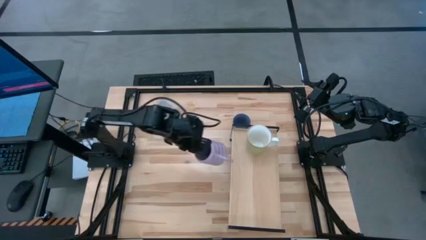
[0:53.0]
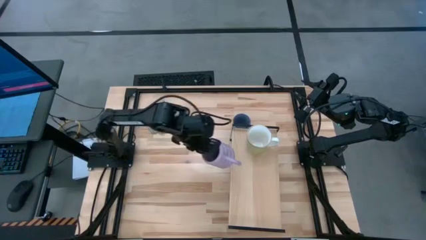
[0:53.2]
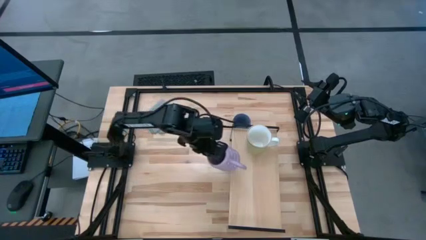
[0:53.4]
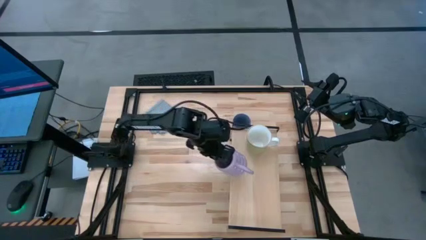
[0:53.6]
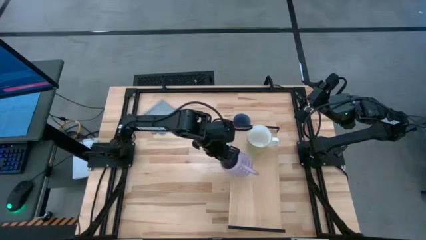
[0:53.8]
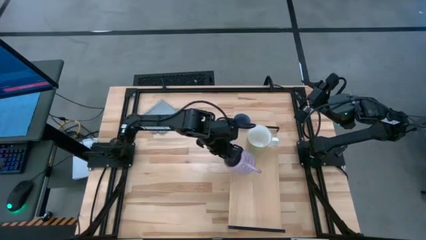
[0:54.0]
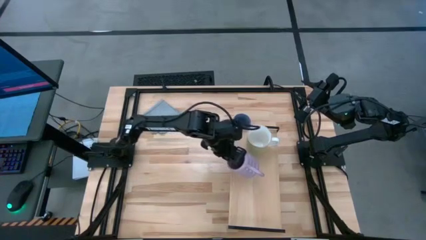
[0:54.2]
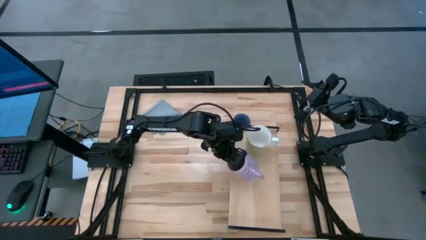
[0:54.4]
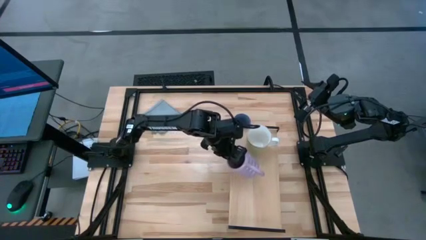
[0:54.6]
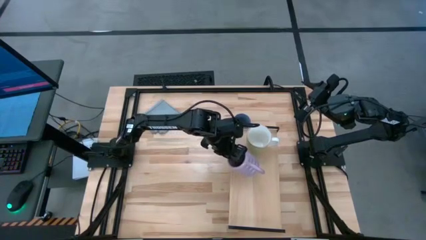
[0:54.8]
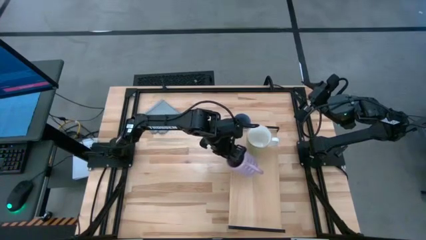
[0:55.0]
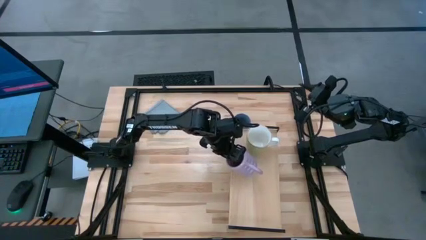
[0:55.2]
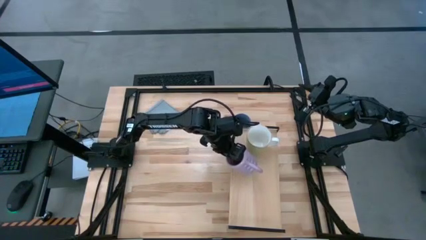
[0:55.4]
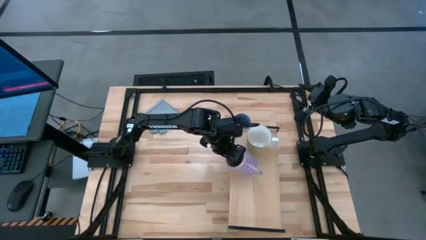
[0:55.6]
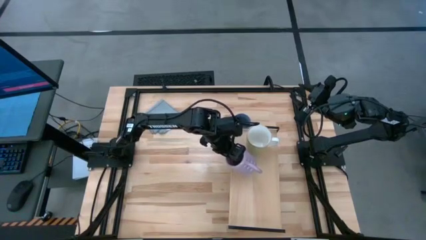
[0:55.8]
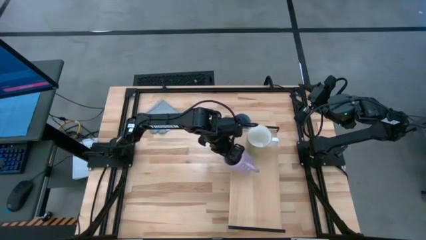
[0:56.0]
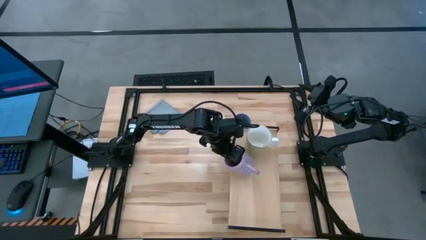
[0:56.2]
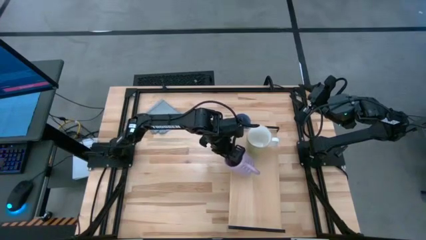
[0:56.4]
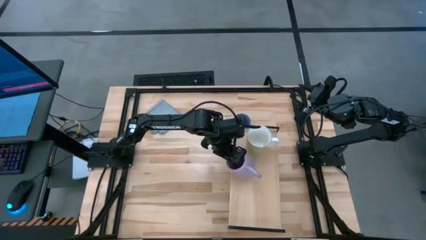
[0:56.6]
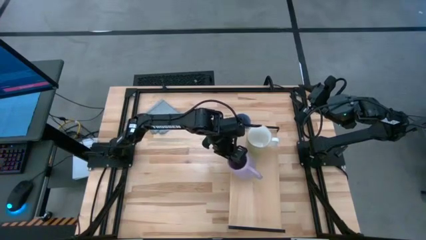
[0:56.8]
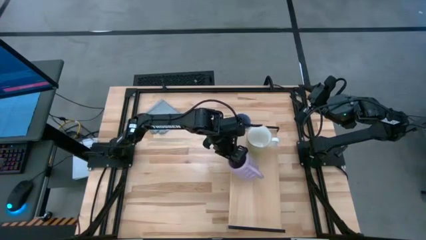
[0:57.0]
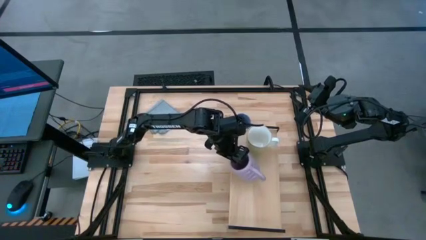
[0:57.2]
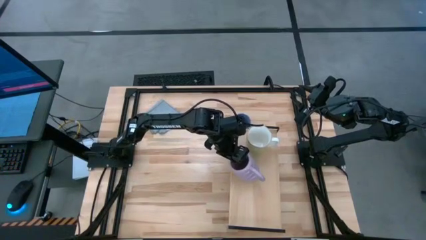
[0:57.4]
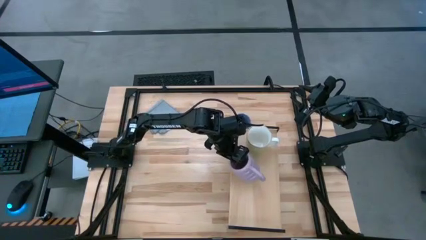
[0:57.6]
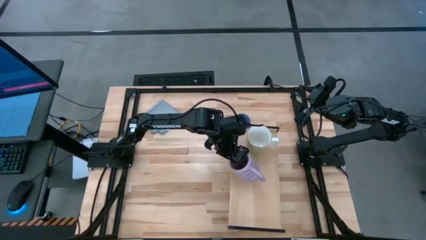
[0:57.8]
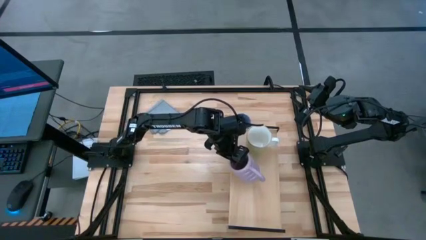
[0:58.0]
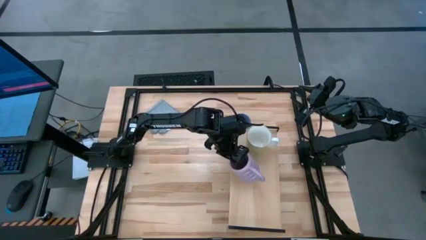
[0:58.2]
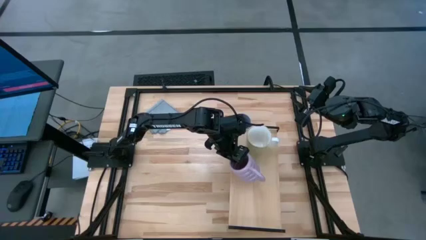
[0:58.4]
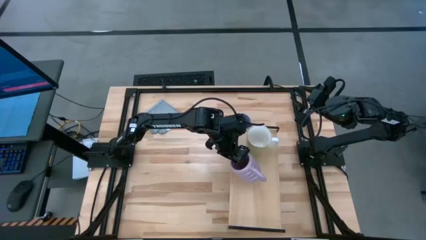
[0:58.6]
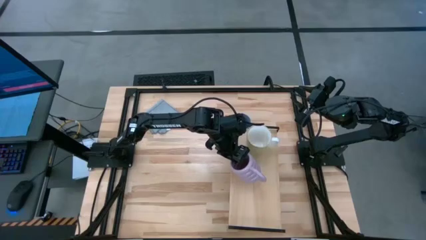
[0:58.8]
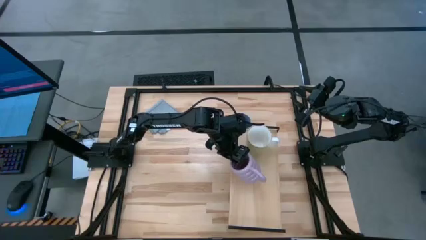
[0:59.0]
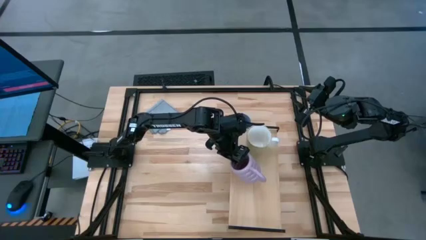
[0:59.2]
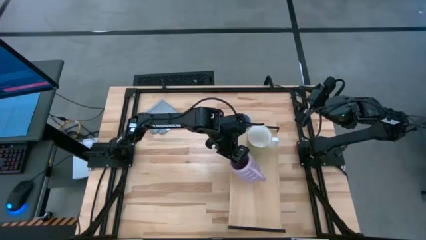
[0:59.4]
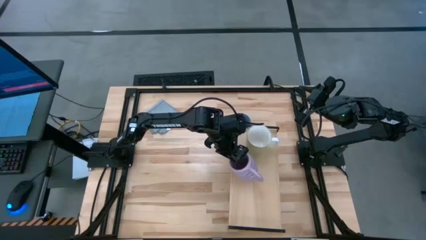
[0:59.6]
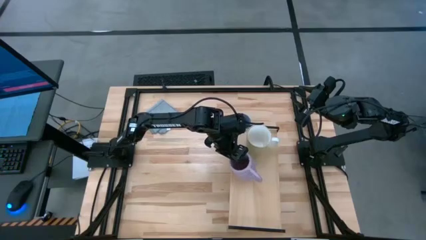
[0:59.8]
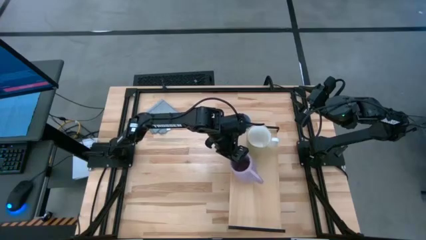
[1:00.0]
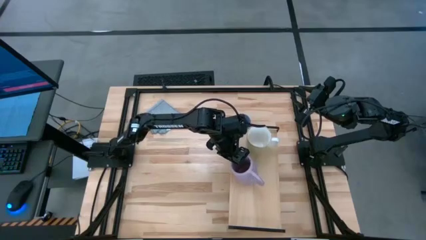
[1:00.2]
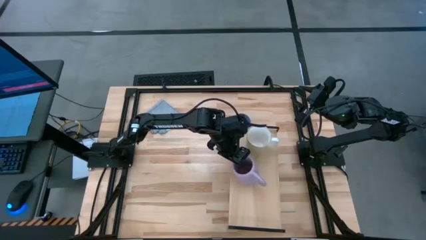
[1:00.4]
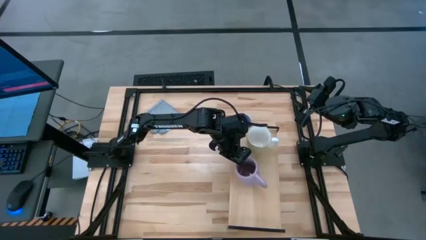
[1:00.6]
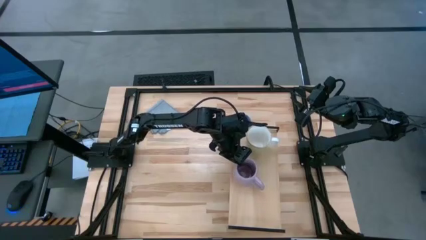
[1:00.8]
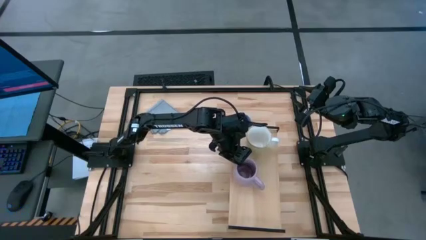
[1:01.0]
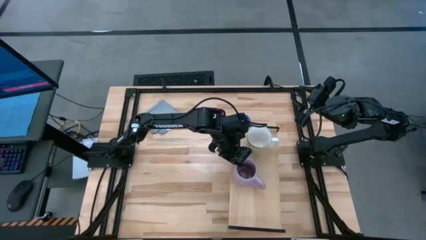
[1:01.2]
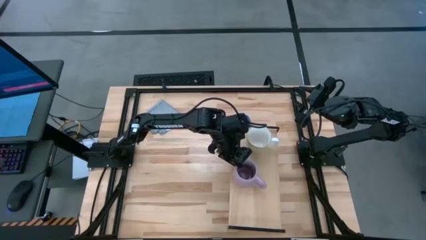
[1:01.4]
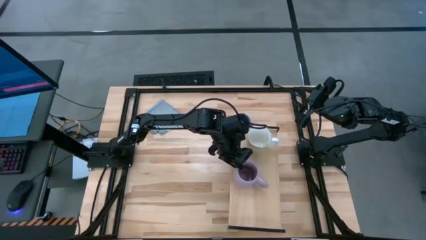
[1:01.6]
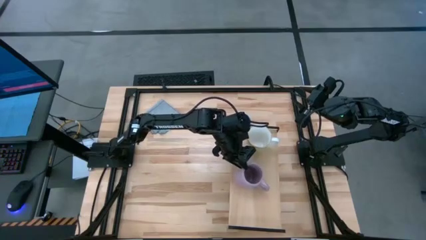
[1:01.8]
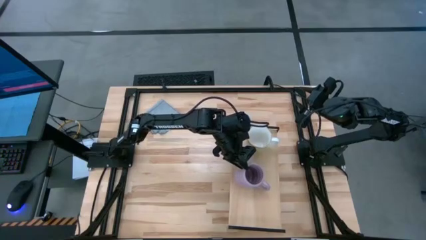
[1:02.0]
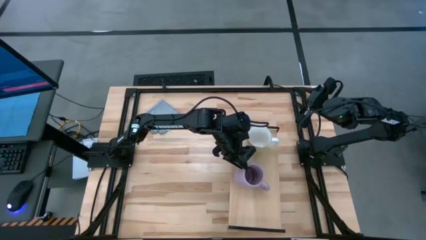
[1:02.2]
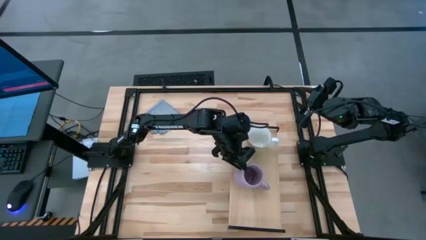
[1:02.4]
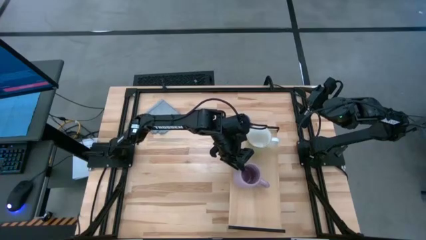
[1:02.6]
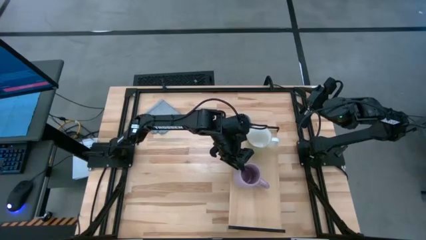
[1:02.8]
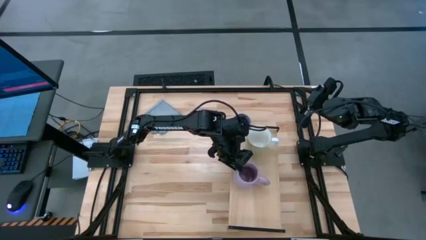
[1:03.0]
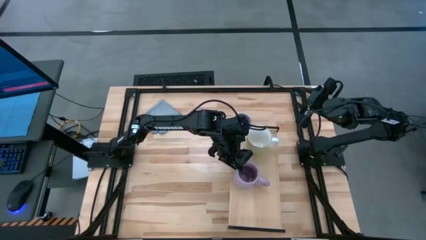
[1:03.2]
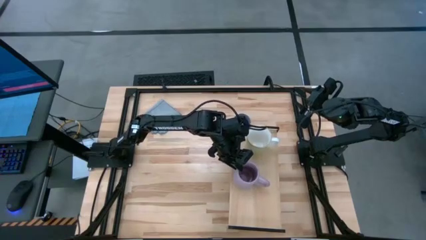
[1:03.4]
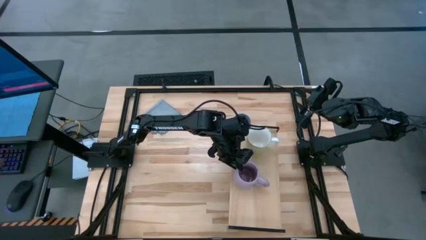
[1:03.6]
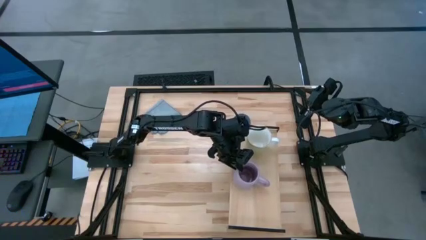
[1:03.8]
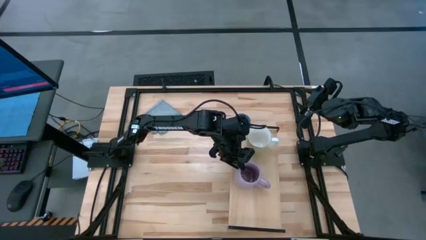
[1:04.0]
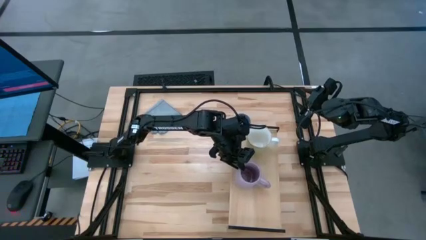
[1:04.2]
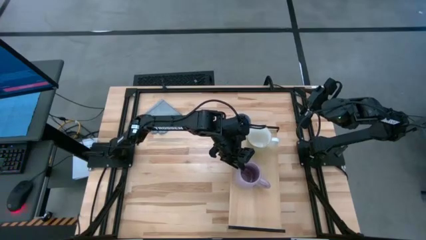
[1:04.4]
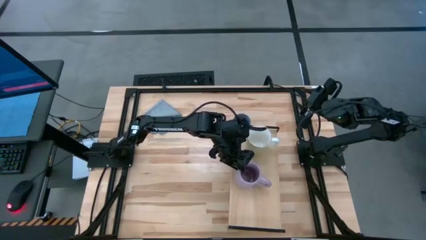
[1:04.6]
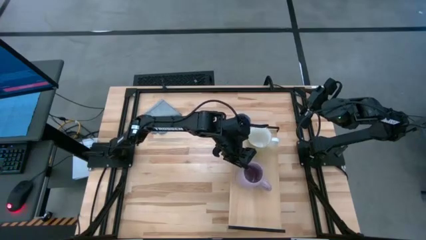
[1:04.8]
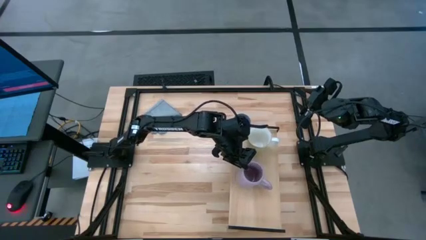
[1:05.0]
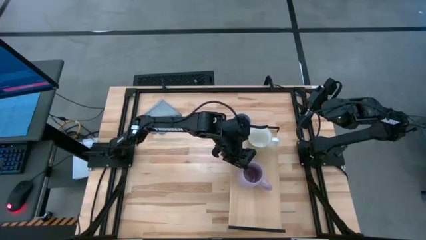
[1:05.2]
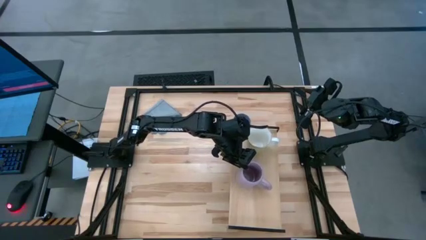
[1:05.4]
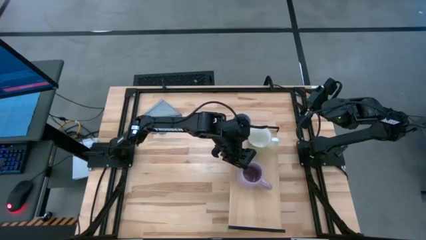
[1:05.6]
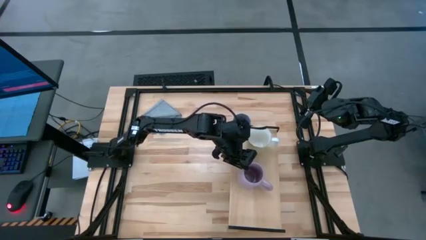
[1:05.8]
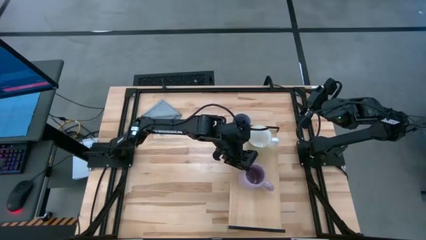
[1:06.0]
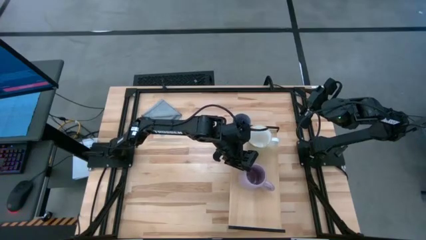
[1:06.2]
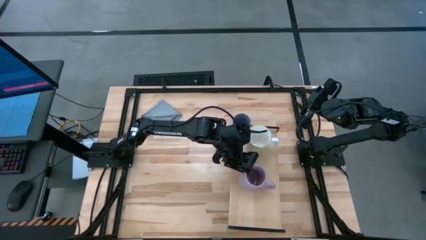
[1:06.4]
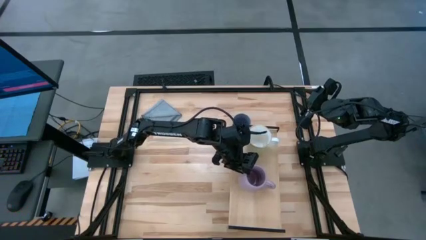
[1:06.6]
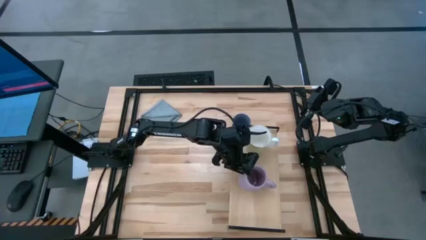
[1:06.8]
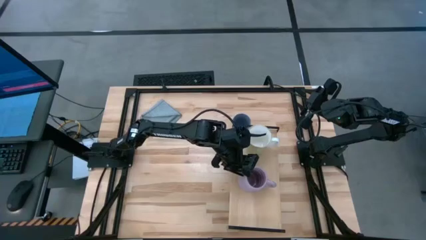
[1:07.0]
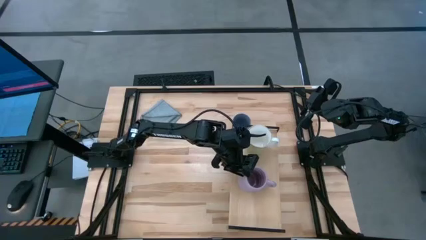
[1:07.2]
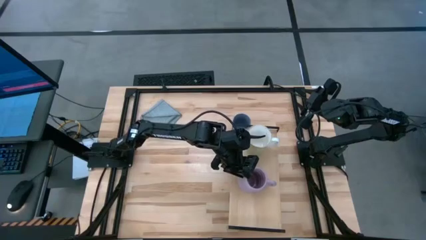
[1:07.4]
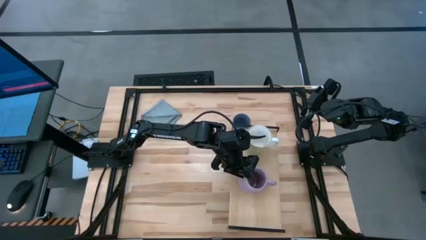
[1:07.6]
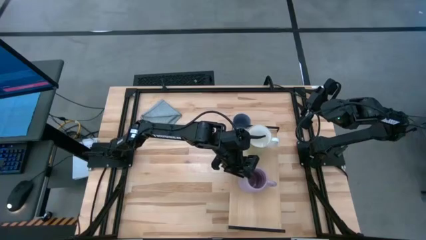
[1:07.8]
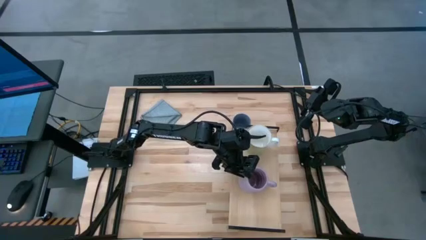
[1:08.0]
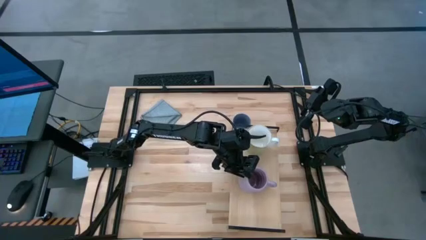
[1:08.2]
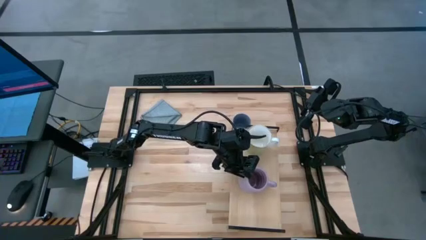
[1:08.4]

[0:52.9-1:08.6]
Task: Stack small to large cups/mugs on shelf
Put the violet mug on the shelf

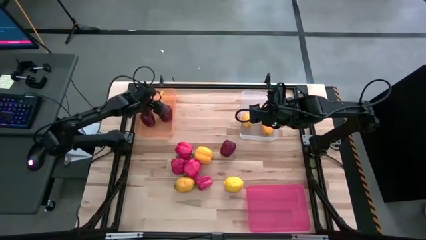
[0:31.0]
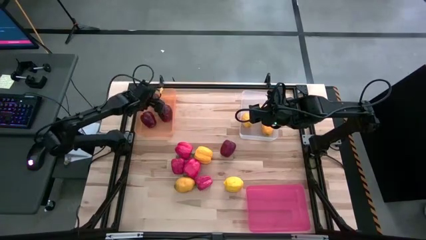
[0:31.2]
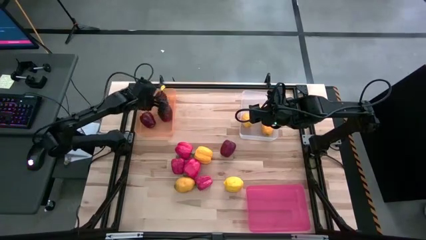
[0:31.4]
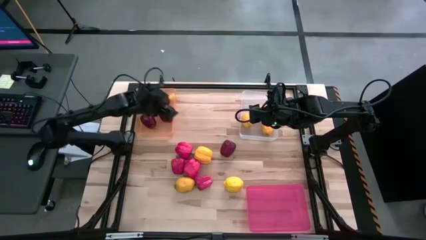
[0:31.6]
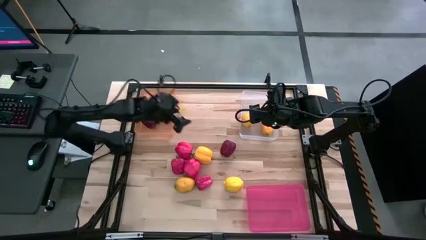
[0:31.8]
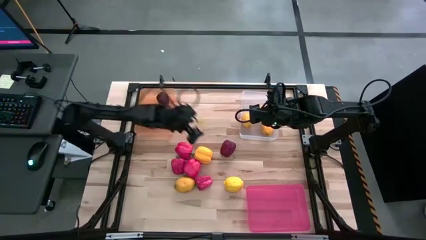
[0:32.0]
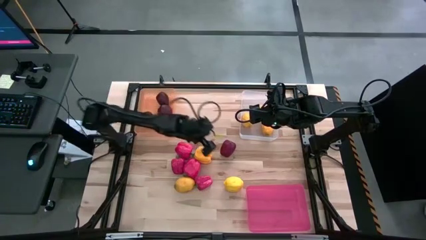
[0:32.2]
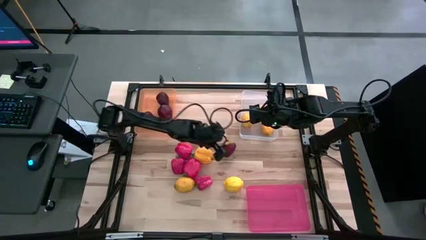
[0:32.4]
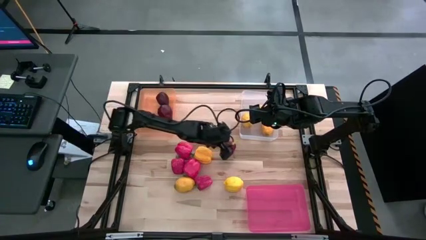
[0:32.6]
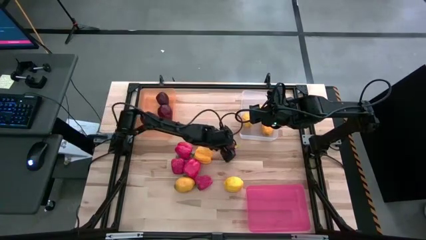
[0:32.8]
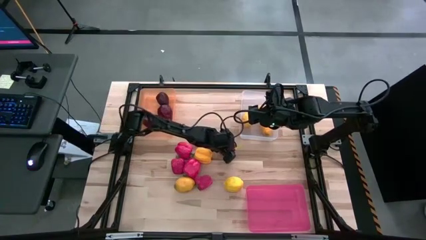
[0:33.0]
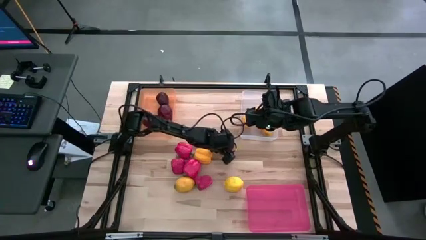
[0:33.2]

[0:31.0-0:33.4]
Task: Sort produce into baskets
Put the apple into the orange bin
